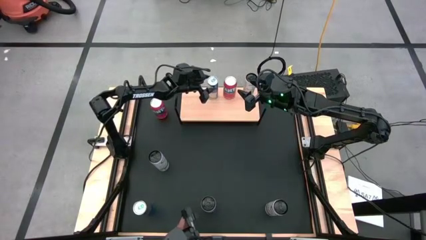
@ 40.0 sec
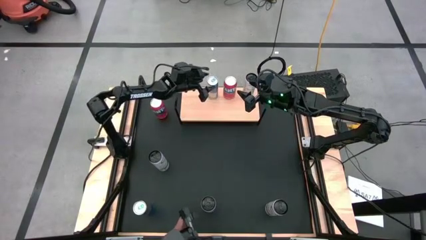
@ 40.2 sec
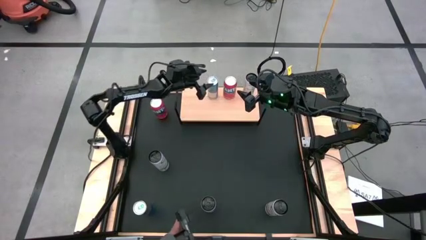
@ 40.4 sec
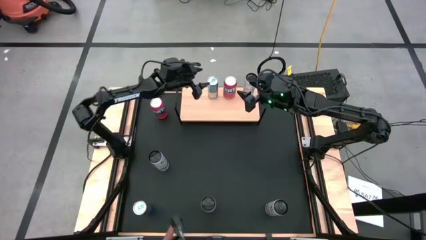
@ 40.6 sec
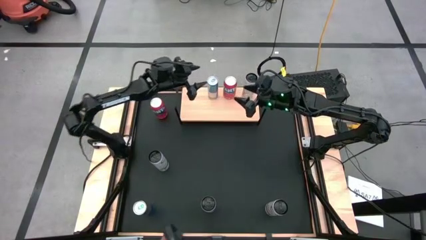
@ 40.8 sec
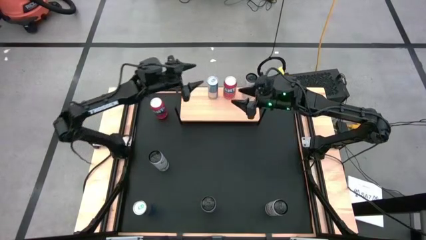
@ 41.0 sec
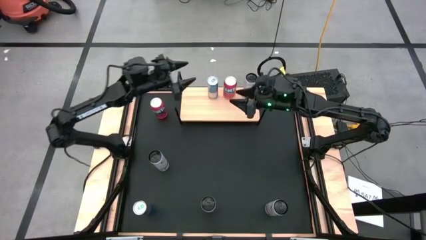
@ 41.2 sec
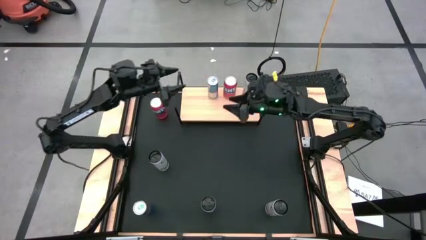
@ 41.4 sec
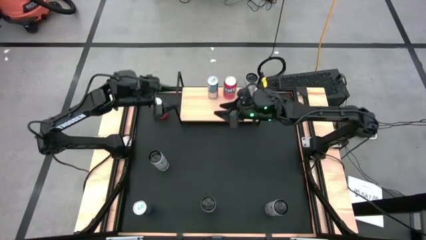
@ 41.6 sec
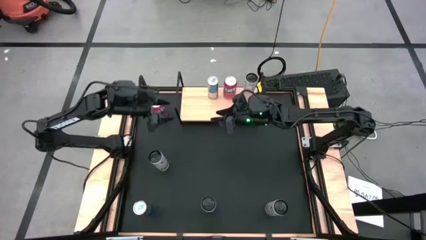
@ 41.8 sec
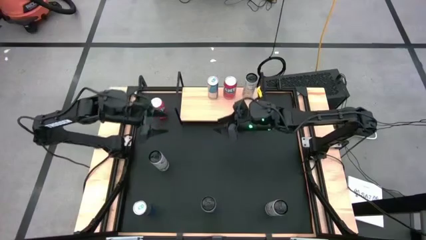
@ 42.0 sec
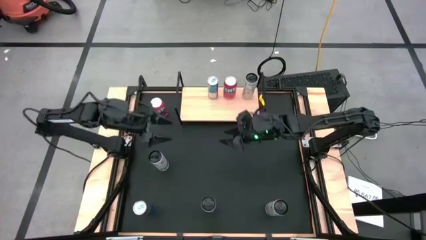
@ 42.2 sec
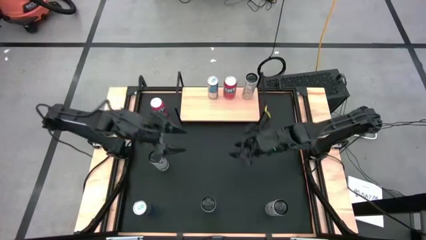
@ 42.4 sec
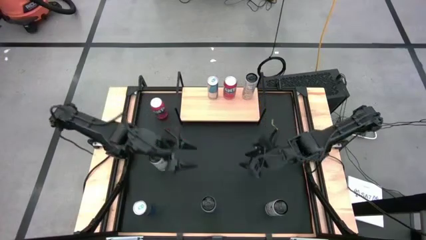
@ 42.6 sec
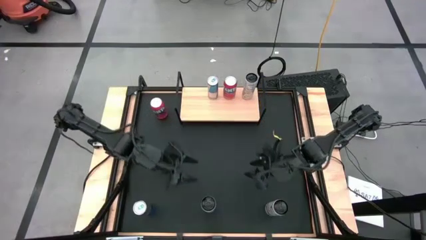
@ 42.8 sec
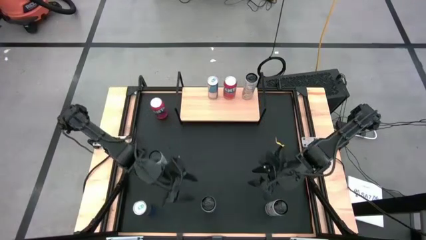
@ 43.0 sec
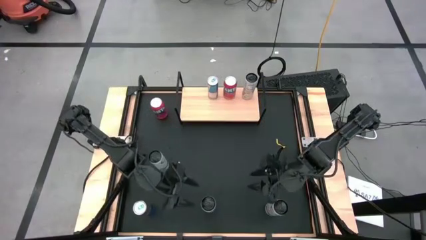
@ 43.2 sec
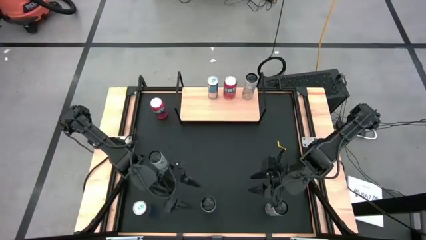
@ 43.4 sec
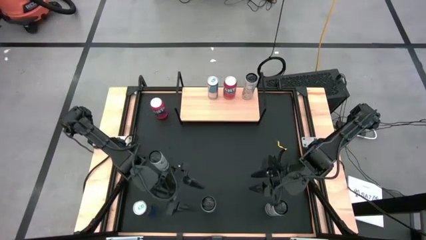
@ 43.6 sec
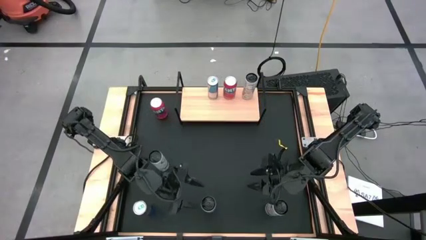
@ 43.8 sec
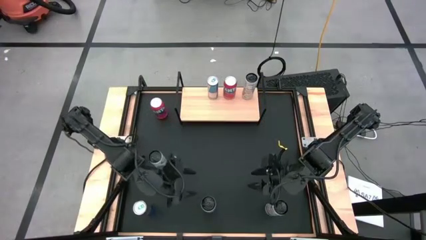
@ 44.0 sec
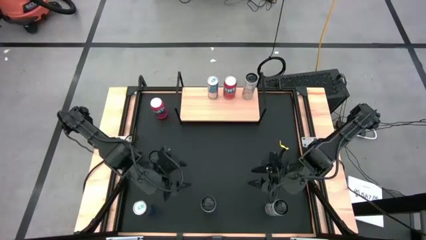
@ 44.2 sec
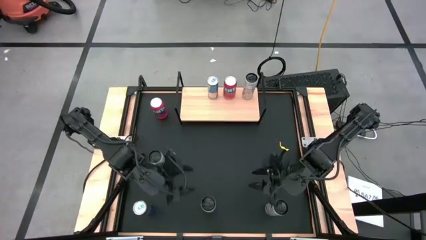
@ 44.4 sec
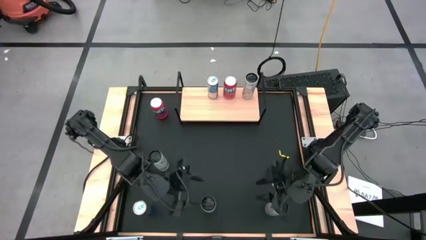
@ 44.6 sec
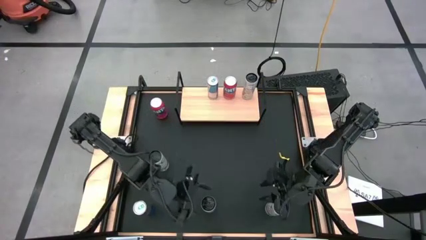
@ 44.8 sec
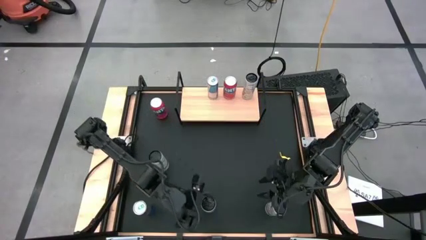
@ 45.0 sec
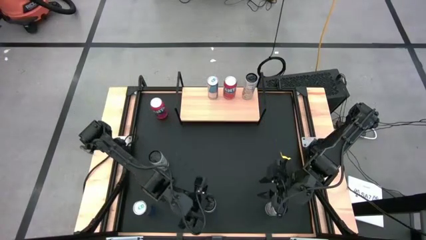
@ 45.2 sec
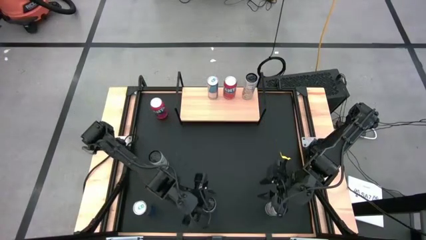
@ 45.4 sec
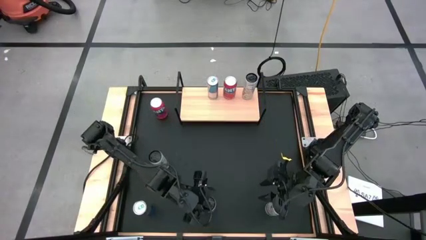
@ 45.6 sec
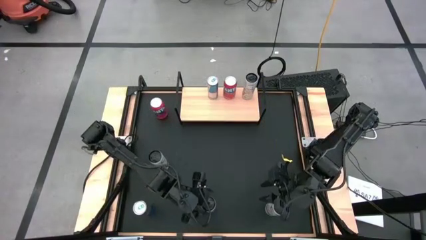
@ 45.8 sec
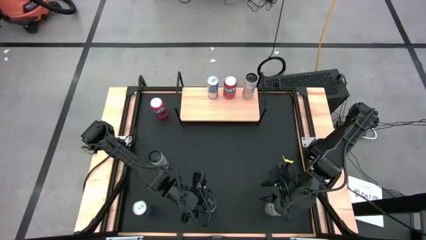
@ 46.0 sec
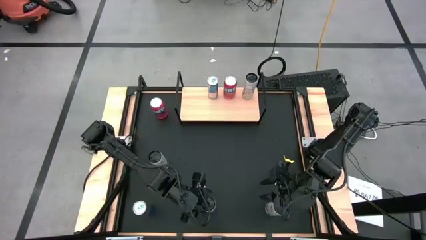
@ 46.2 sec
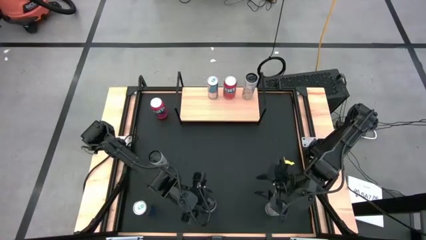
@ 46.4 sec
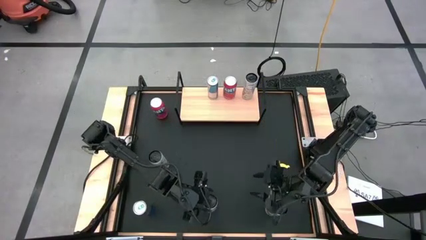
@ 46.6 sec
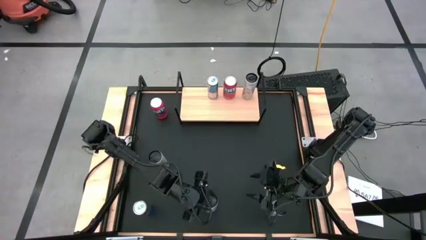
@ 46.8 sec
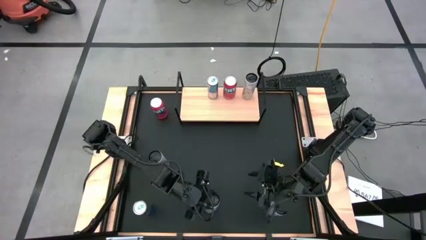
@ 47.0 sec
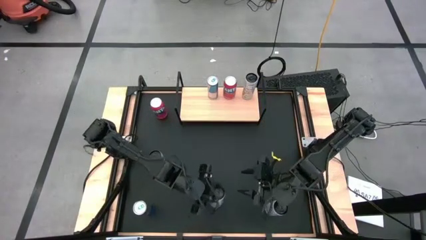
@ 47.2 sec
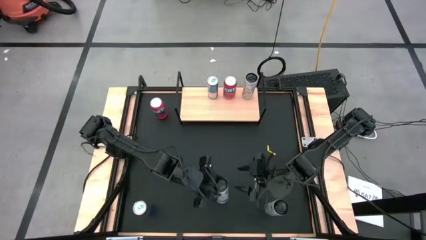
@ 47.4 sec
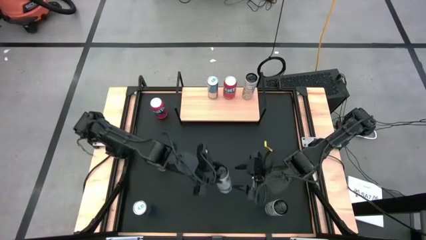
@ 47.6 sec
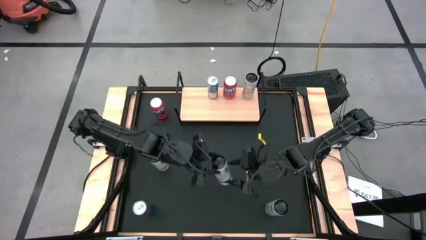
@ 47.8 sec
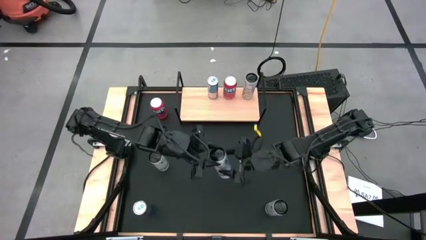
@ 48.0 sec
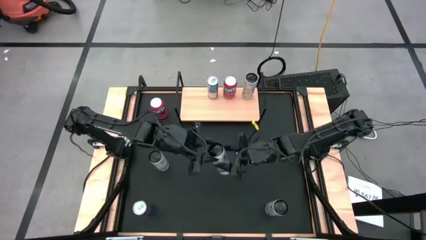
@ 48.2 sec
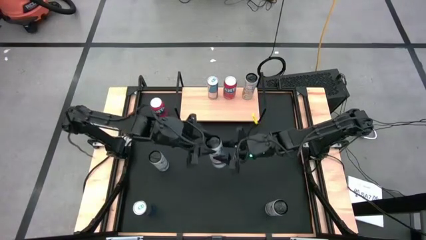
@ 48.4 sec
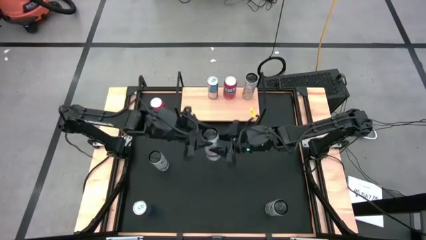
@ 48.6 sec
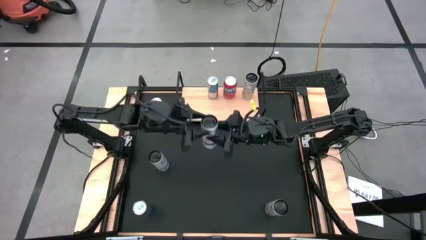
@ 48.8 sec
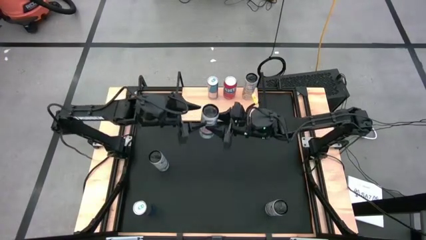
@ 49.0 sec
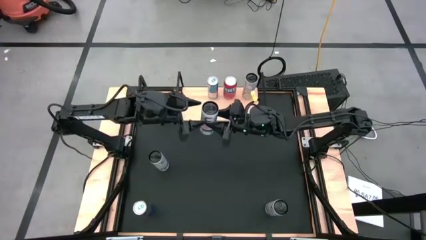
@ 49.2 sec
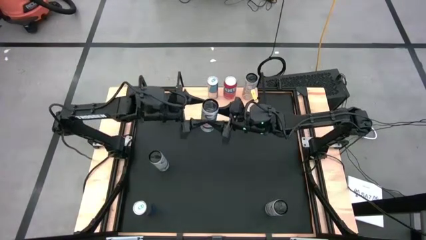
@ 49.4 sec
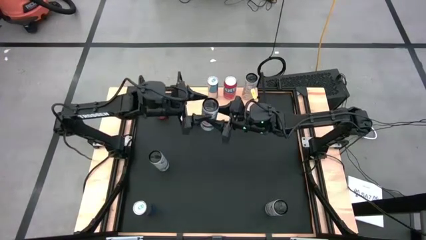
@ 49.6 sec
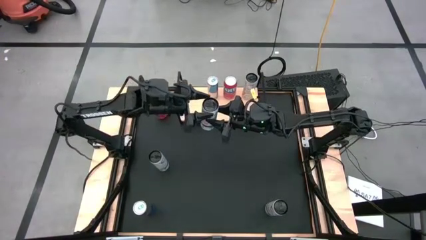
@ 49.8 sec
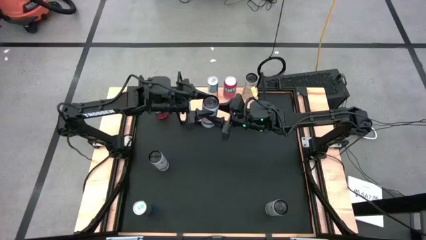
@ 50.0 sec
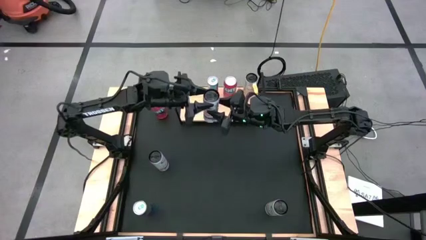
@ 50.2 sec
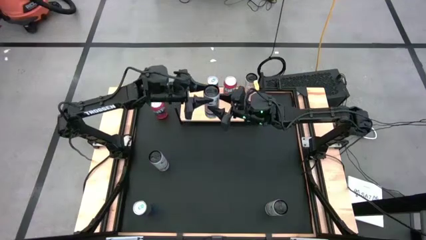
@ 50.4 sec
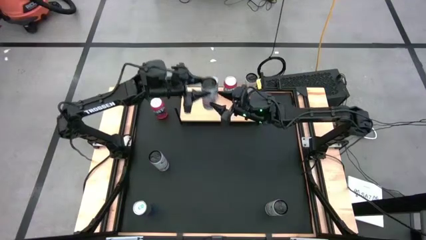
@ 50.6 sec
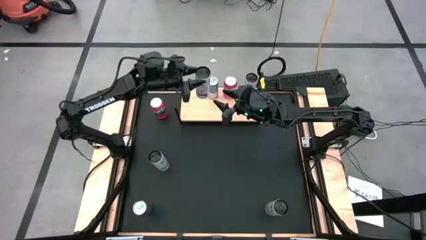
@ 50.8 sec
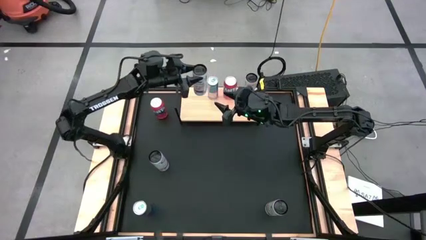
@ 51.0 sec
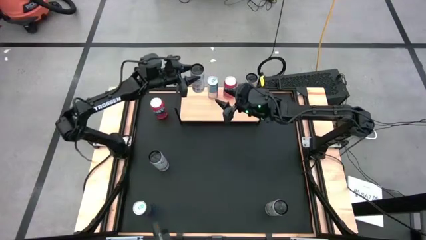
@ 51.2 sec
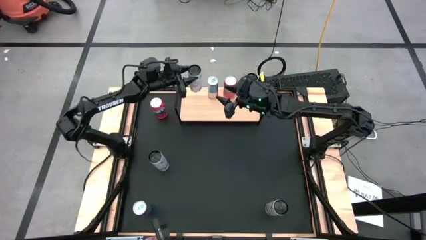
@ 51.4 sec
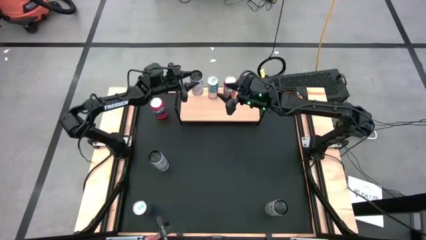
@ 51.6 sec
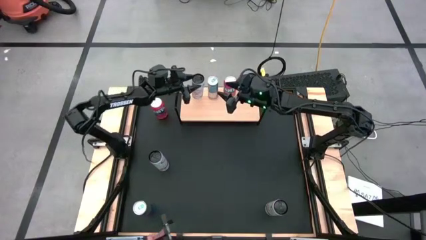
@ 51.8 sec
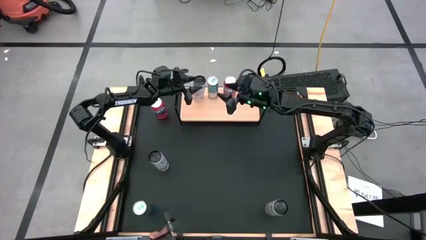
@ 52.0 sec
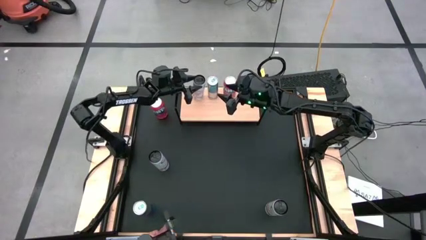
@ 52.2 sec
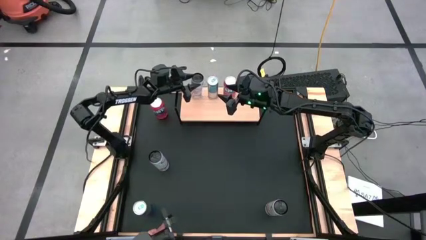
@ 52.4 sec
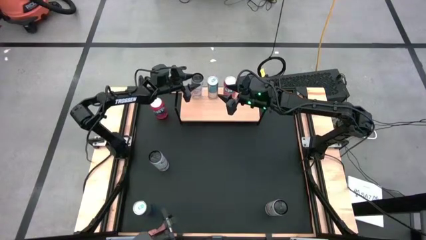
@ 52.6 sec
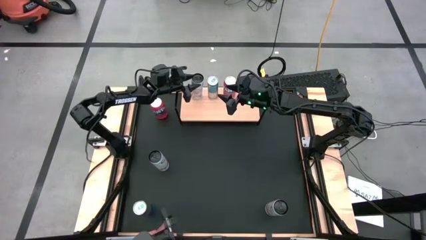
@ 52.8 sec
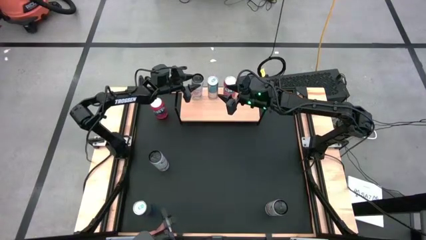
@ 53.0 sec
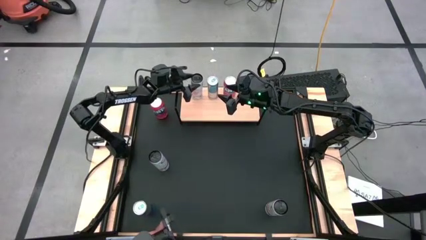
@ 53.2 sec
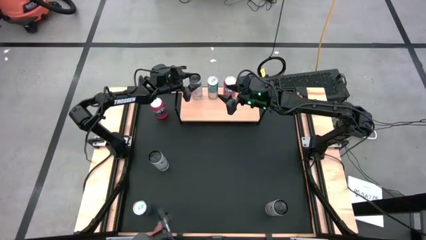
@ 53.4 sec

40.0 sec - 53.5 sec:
Task: Place canned beverage on shelf
Put the left white-pink soda can on the shelf
